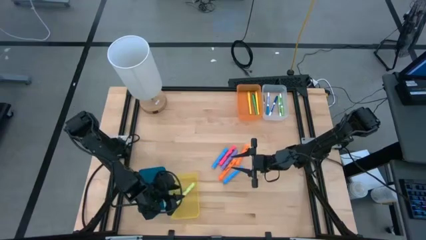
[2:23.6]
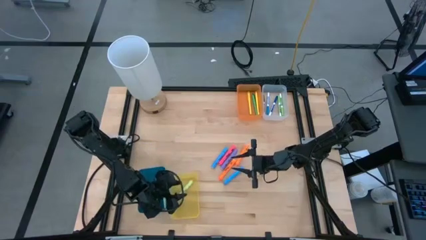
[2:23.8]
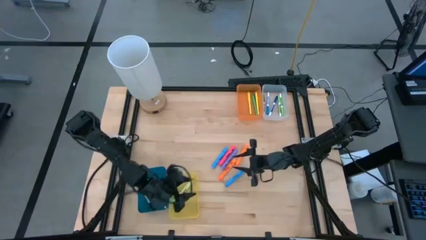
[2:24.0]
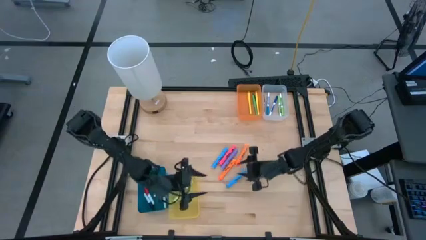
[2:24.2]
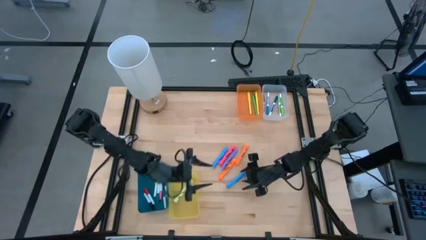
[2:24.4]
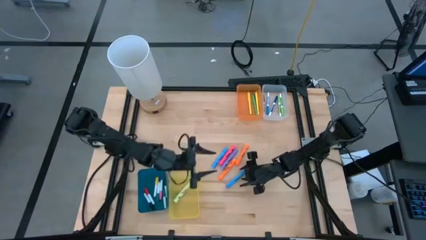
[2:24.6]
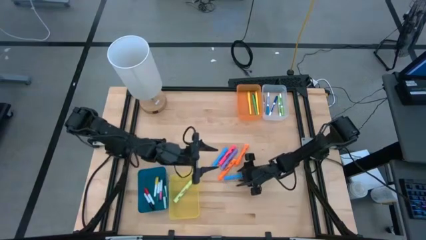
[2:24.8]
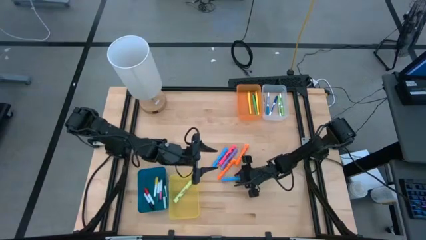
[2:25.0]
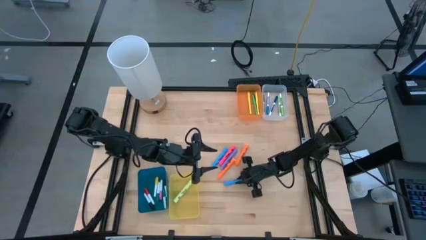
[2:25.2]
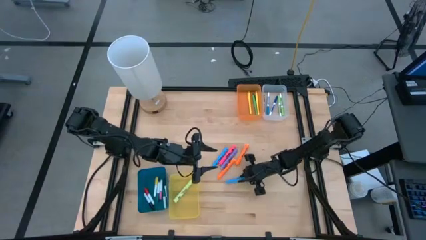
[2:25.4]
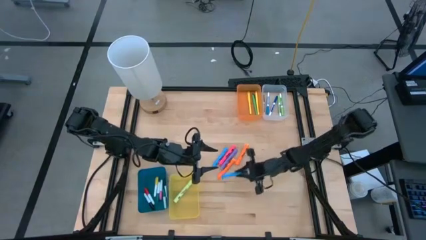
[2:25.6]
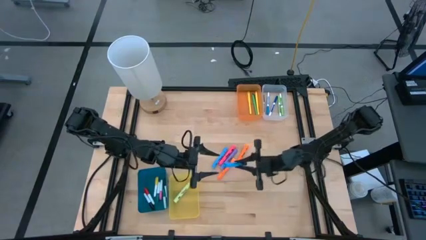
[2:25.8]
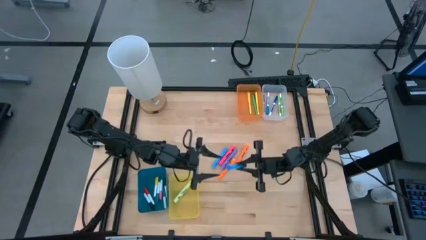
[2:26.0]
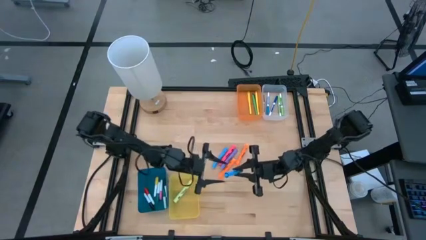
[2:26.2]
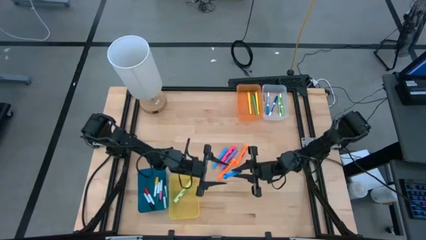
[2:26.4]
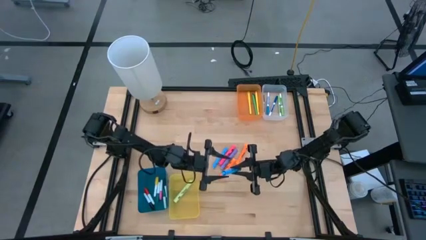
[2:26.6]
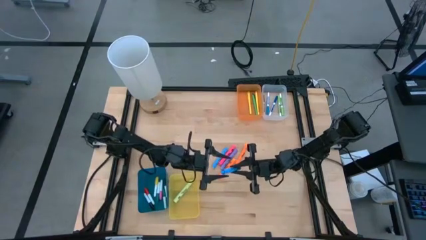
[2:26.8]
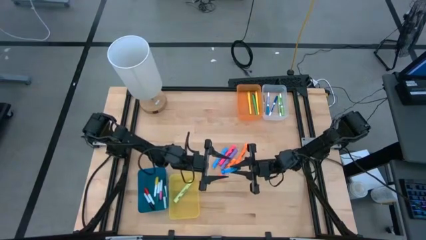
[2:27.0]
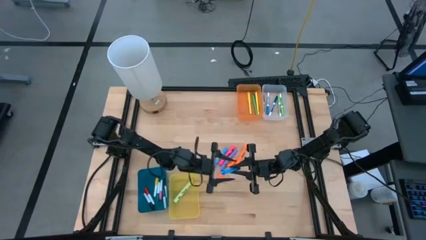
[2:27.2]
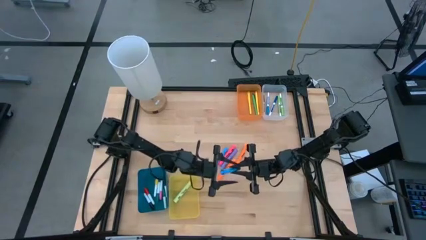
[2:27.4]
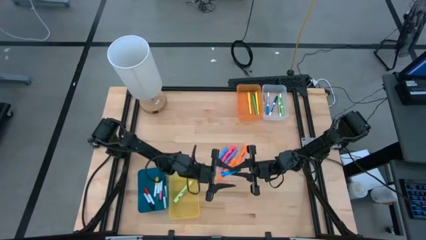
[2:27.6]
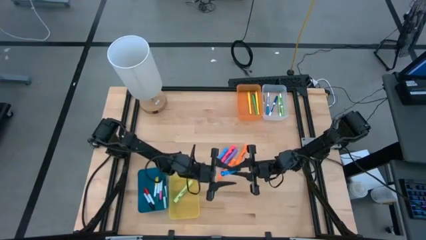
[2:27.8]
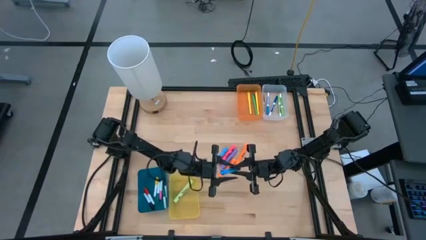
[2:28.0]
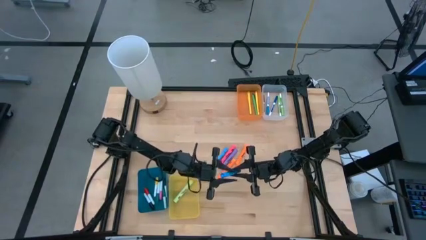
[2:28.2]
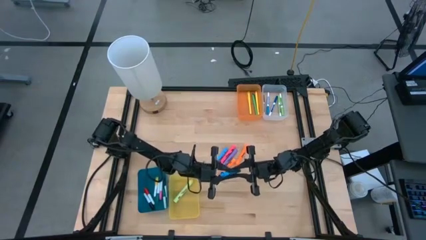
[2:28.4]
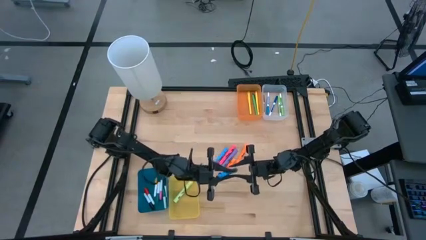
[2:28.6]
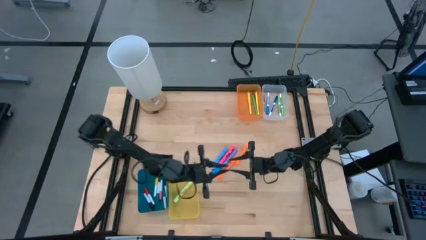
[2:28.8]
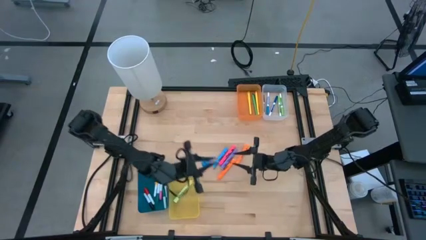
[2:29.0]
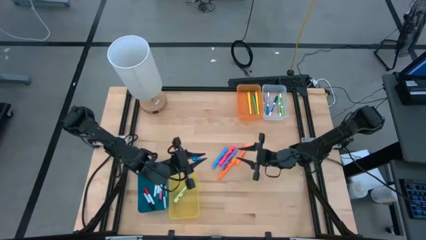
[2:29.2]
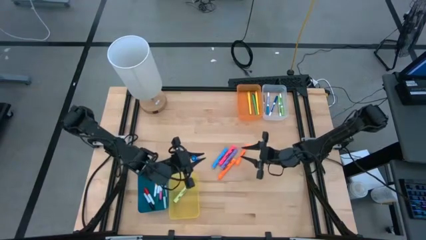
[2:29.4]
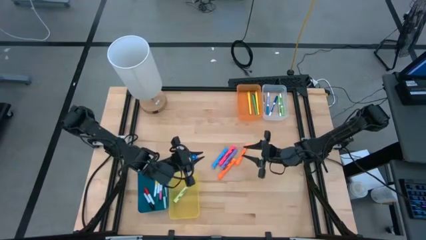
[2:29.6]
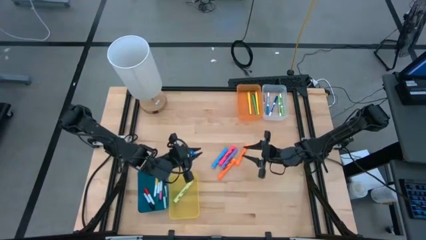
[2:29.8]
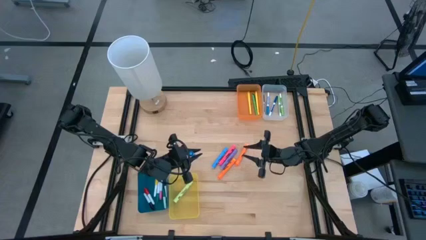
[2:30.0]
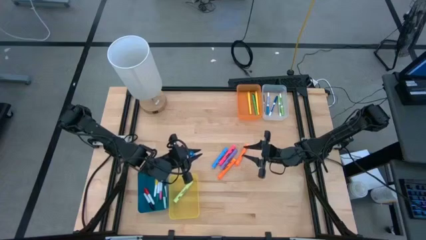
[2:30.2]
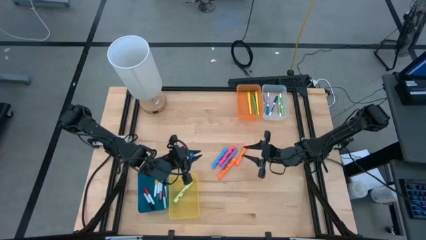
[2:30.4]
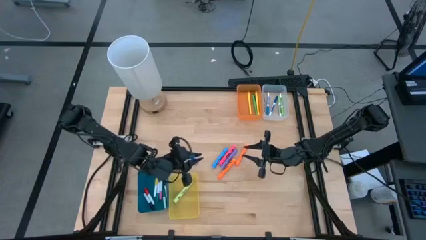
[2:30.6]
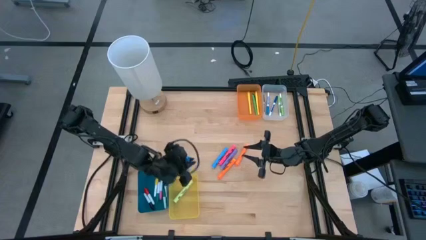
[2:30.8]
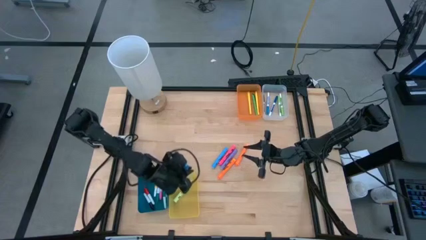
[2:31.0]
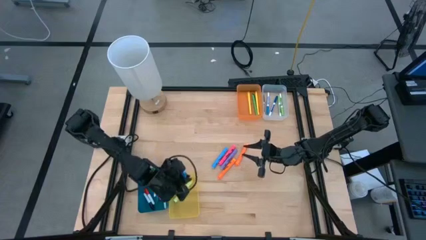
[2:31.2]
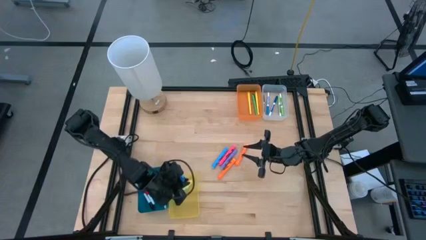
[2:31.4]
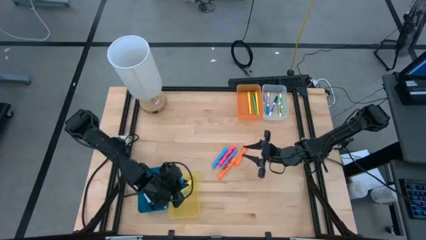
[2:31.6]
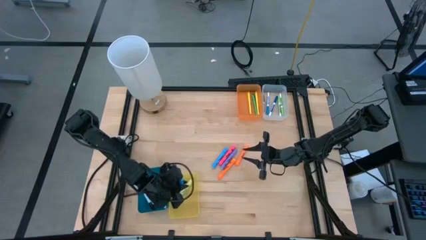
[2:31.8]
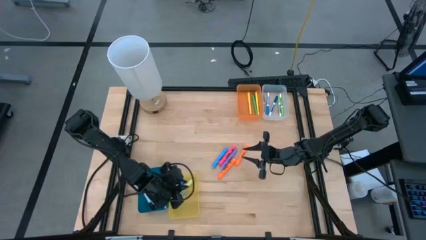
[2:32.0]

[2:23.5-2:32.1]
Task: Pick & Place Markers
Put the bottom light blue highlighter pen into the yellow bin

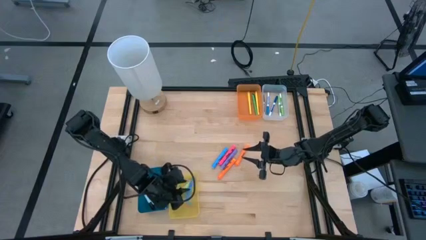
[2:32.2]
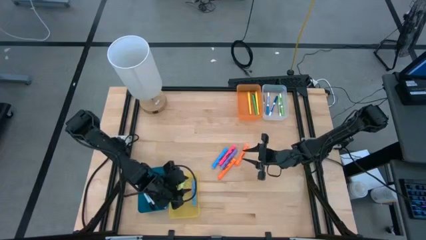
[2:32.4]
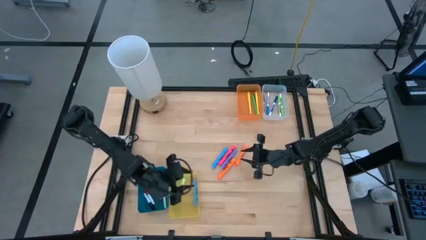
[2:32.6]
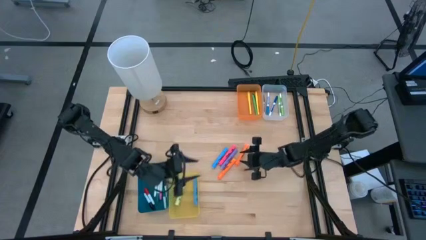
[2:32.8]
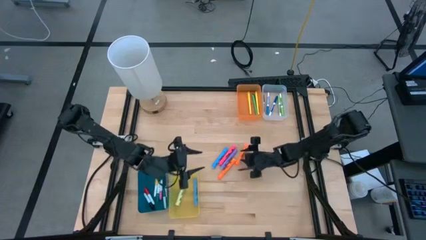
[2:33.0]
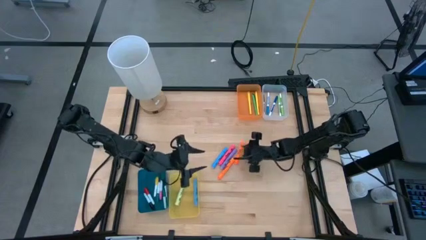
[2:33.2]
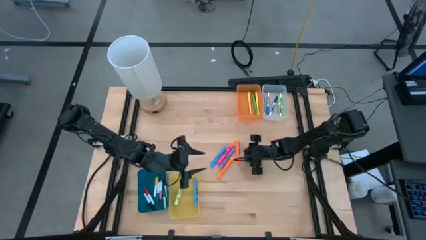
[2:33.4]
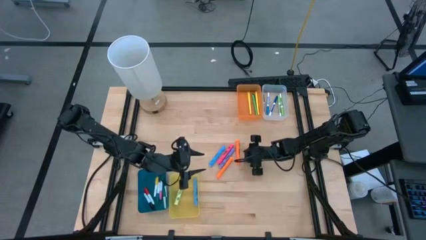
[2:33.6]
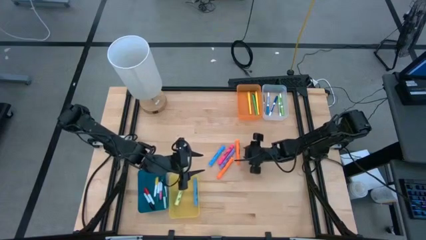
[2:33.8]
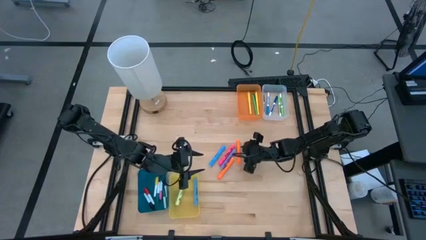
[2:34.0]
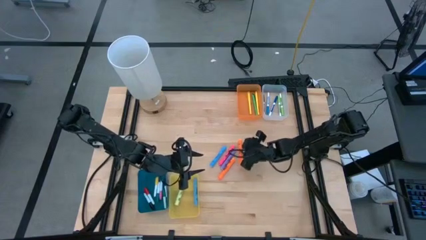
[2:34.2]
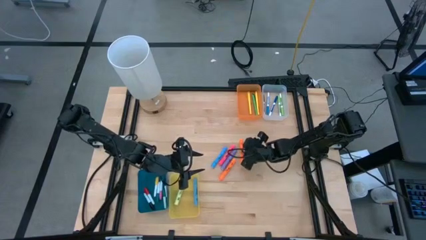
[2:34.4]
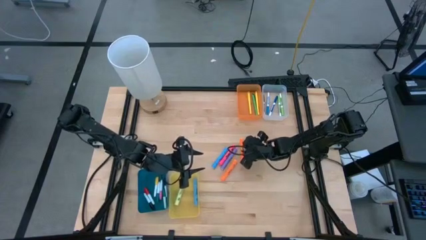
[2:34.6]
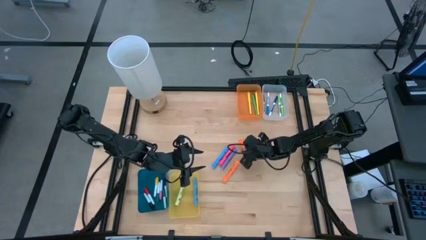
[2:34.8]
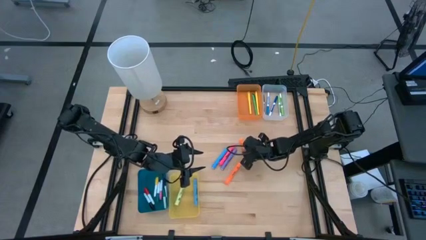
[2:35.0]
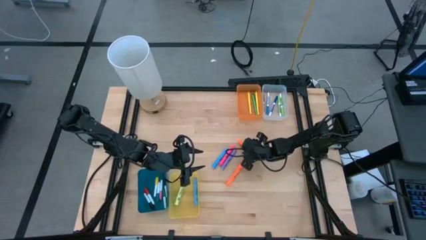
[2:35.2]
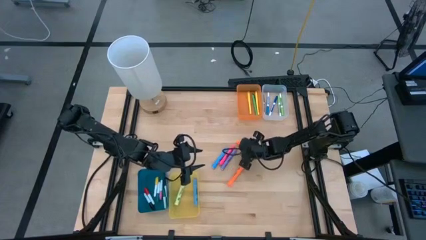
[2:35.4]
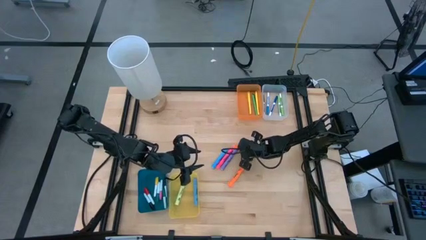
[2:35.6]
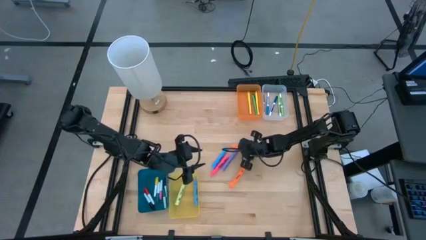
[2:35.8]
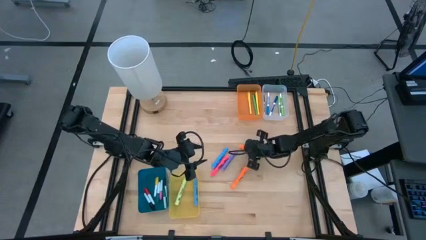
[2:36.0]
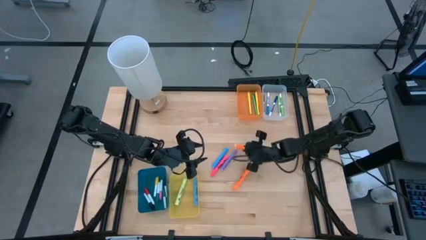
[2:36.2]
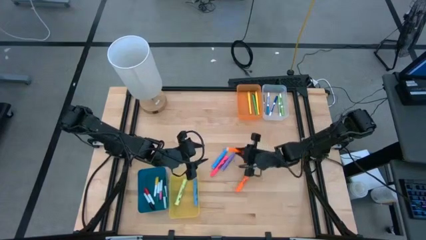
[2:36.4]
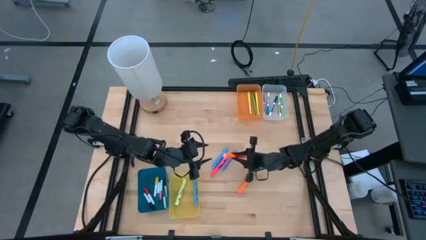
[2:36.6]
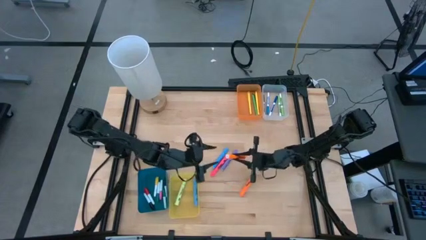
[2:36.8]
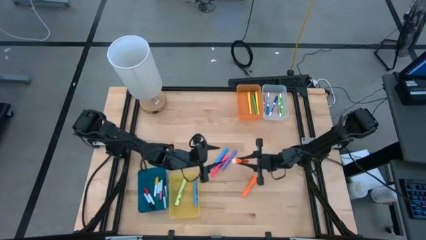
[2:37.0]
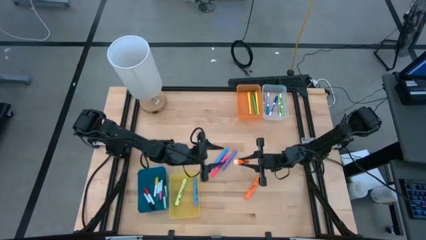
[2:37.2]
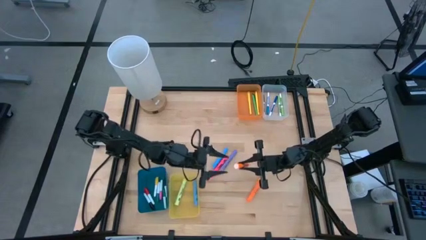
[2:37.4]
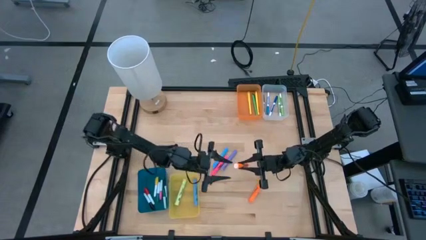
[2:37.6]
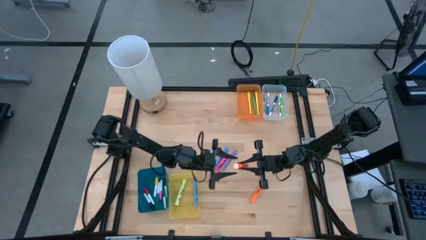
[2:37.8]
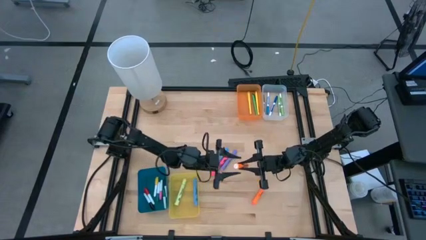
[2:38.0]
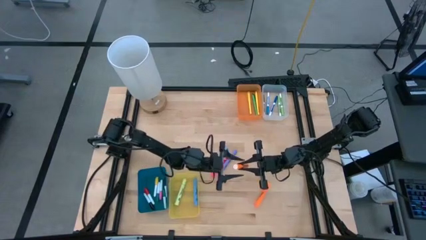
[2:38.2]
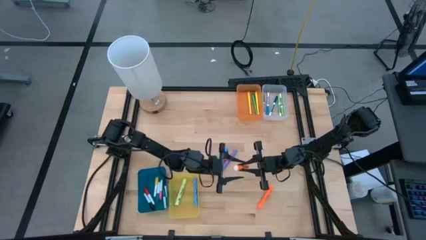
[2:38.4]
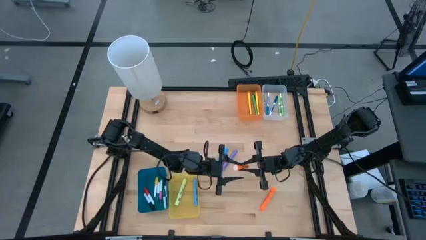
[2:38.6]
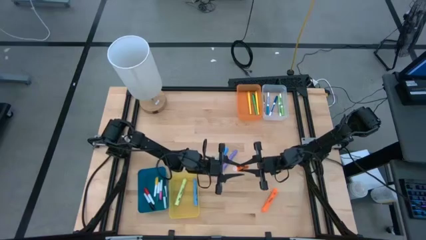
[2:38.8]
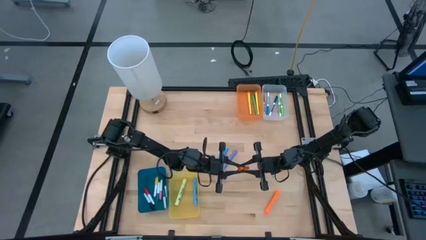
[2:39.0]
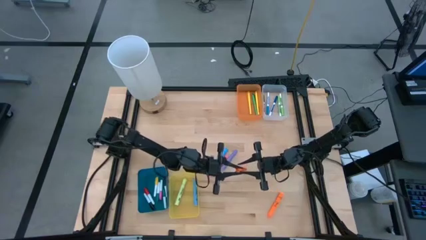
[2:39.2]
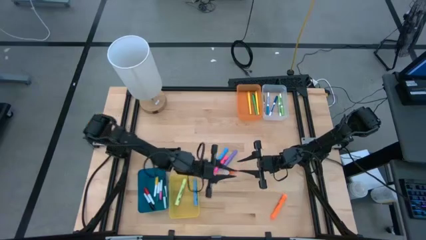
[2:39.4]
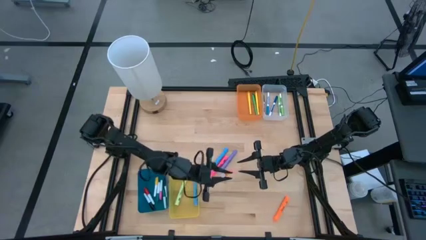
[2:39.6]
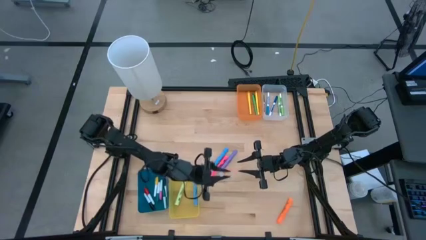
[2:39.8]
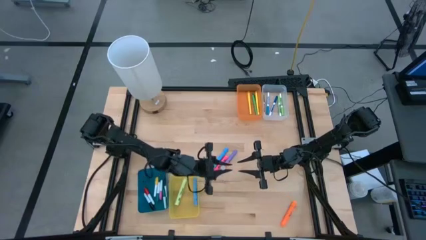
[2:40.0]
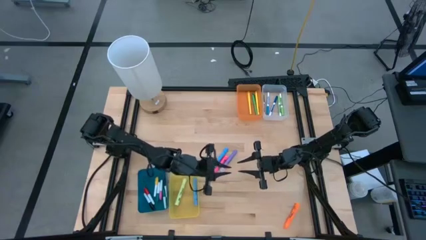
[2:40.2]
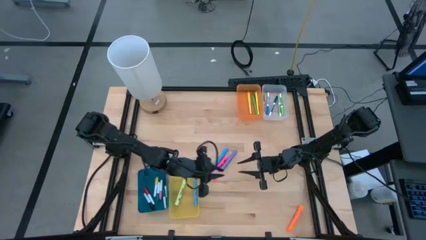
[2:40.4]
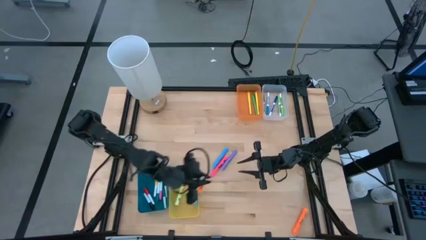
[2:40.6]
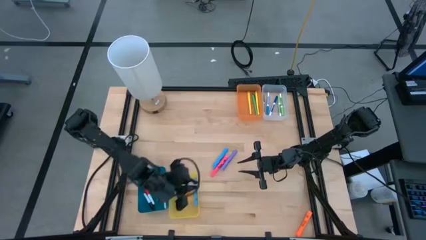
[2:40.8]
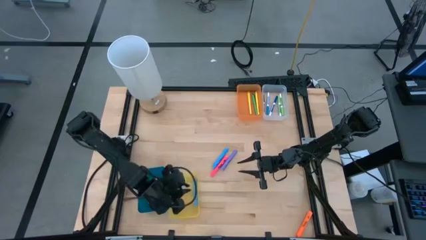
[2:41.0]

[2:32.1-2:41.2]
Put the top orange highlighter pen into the yellow bin
